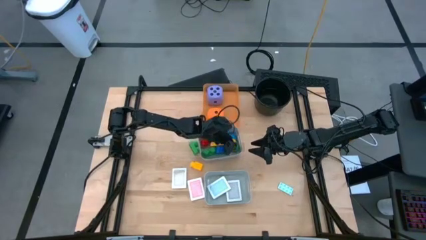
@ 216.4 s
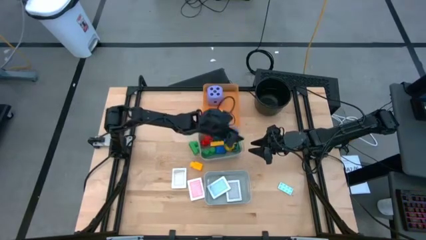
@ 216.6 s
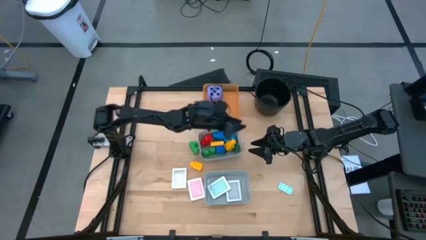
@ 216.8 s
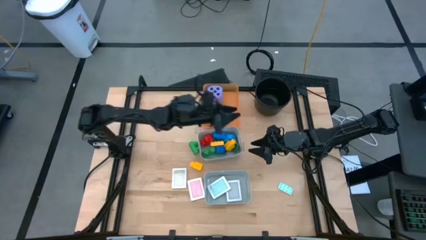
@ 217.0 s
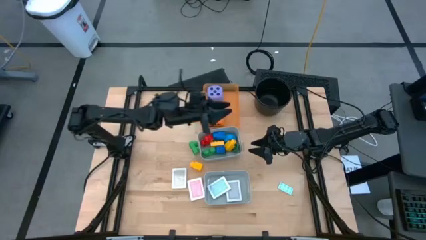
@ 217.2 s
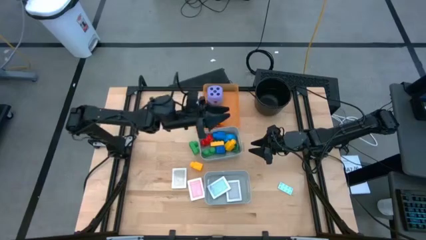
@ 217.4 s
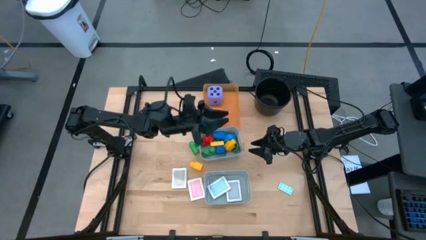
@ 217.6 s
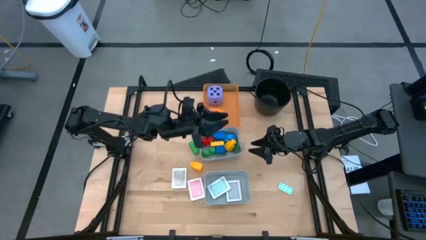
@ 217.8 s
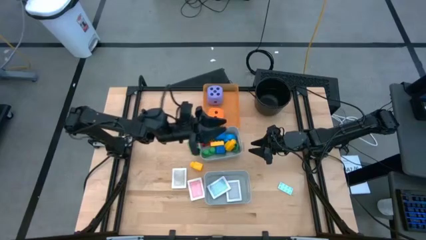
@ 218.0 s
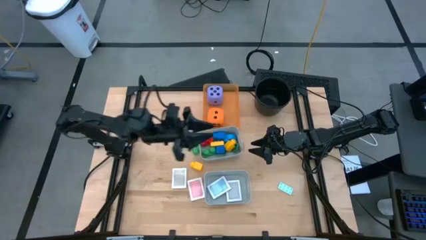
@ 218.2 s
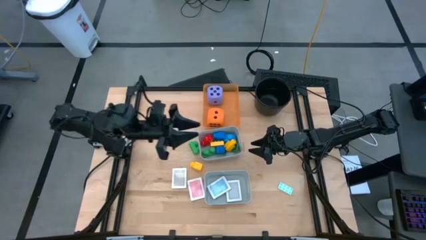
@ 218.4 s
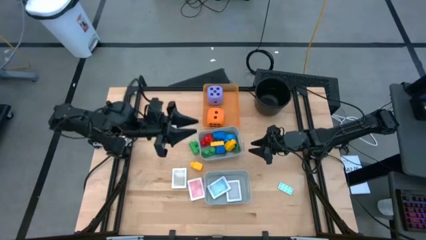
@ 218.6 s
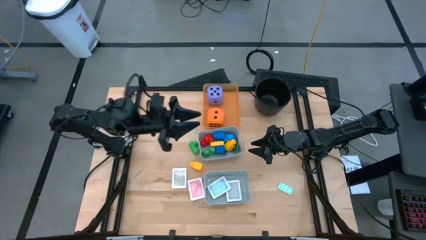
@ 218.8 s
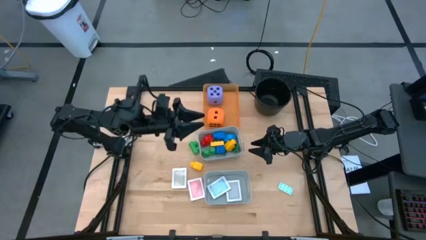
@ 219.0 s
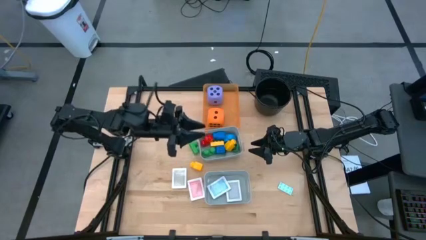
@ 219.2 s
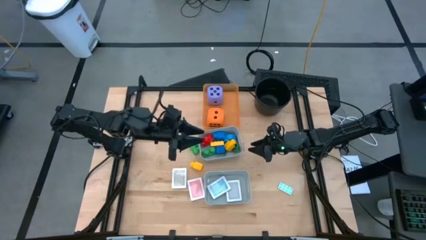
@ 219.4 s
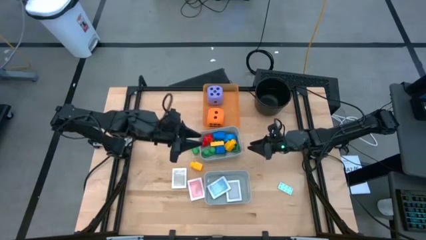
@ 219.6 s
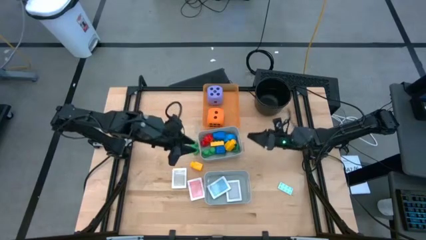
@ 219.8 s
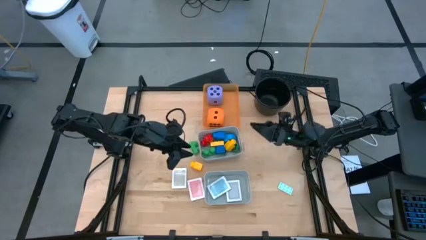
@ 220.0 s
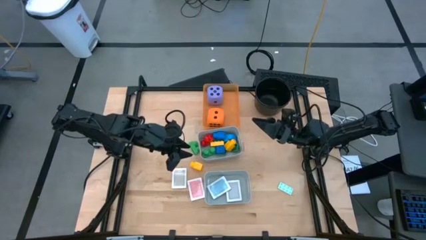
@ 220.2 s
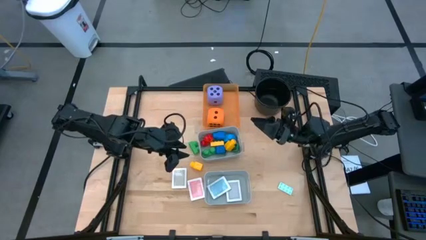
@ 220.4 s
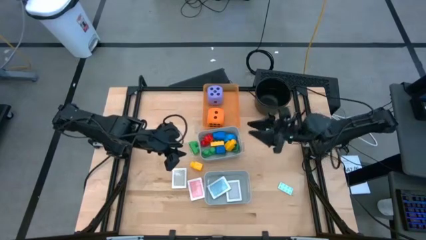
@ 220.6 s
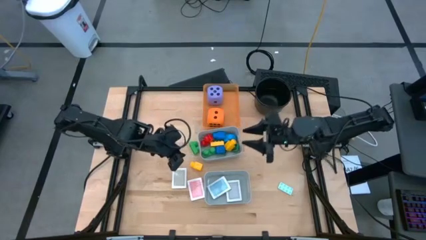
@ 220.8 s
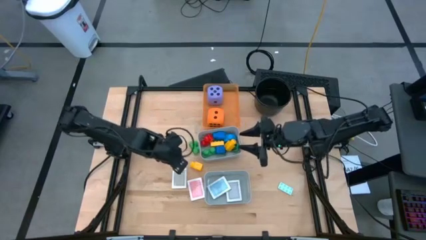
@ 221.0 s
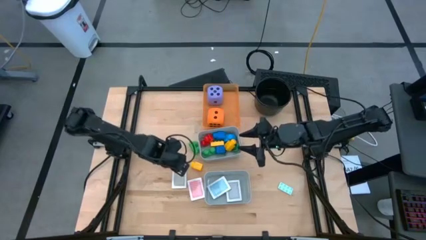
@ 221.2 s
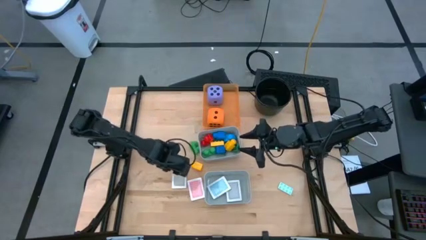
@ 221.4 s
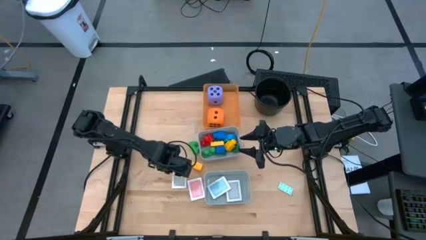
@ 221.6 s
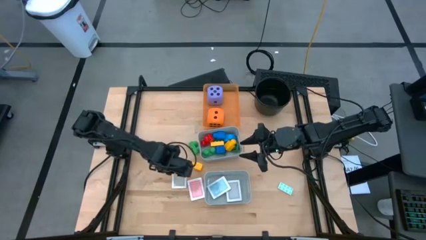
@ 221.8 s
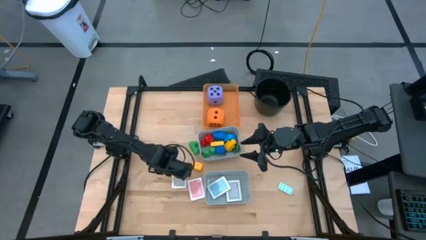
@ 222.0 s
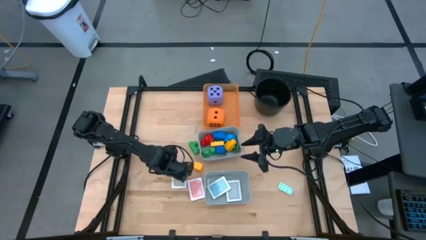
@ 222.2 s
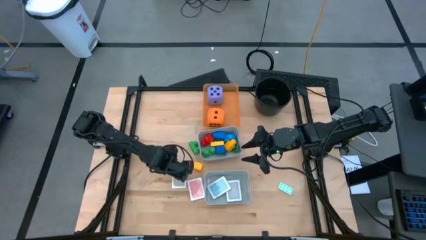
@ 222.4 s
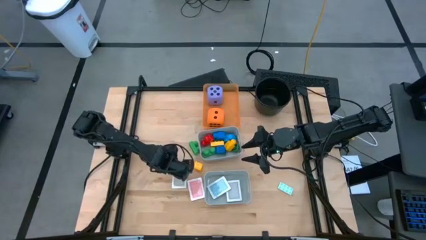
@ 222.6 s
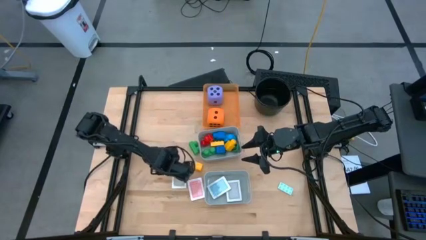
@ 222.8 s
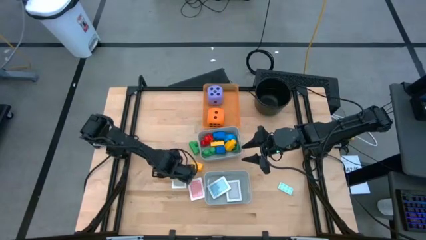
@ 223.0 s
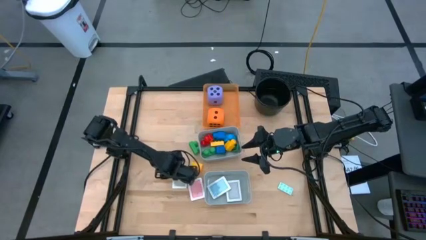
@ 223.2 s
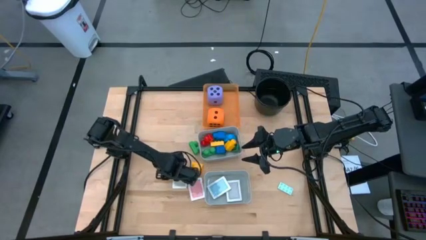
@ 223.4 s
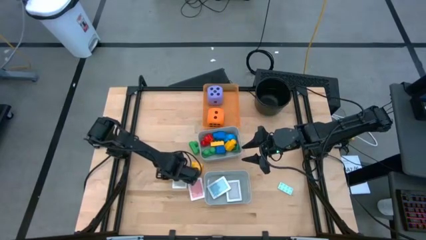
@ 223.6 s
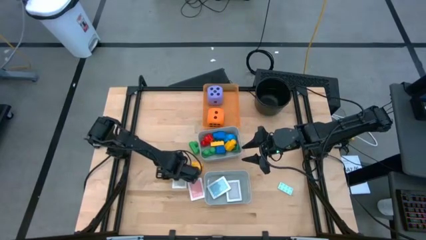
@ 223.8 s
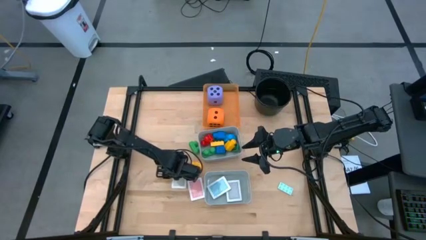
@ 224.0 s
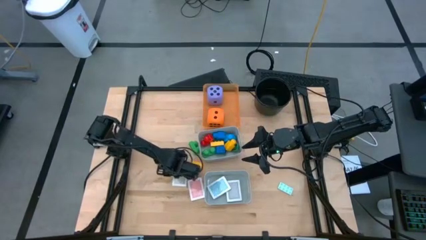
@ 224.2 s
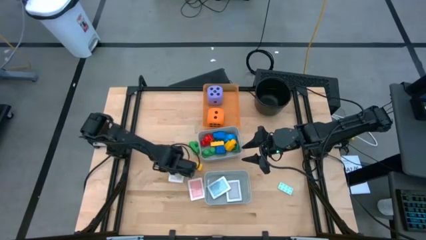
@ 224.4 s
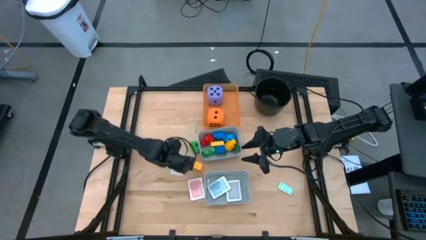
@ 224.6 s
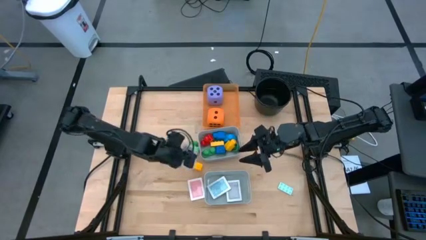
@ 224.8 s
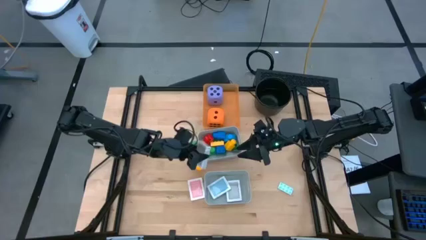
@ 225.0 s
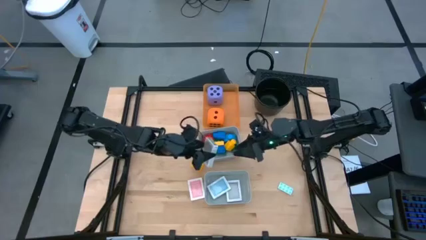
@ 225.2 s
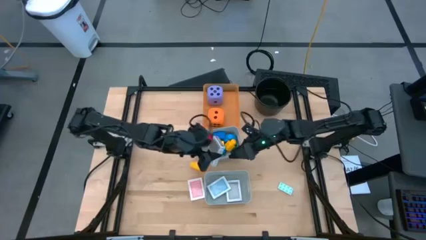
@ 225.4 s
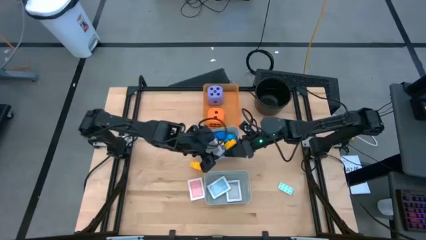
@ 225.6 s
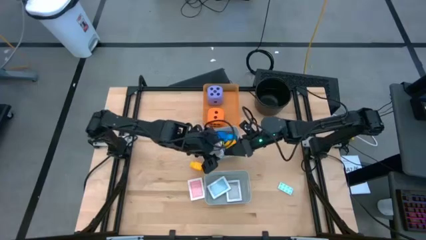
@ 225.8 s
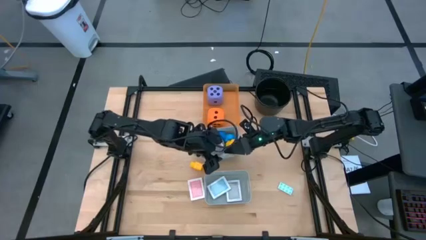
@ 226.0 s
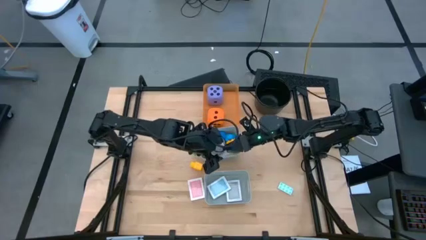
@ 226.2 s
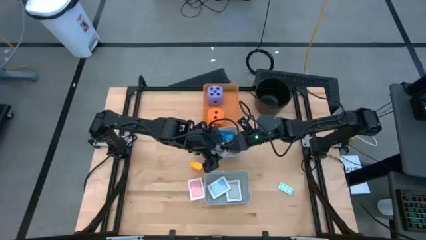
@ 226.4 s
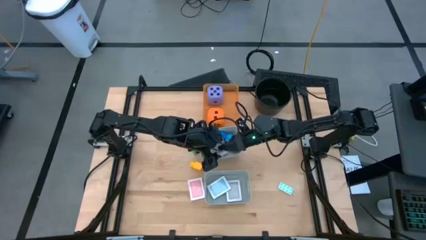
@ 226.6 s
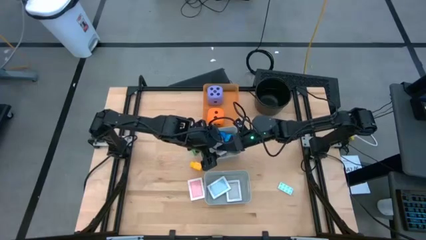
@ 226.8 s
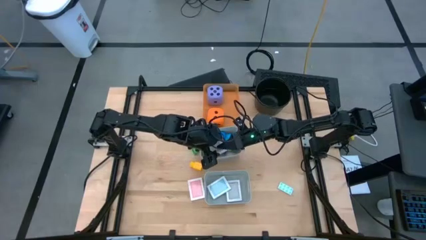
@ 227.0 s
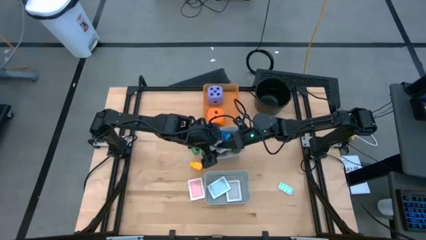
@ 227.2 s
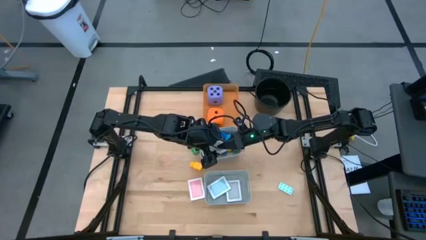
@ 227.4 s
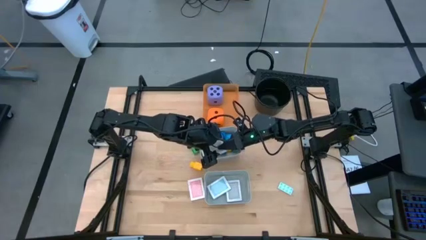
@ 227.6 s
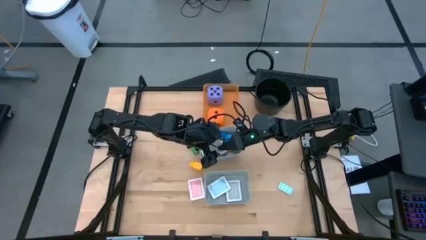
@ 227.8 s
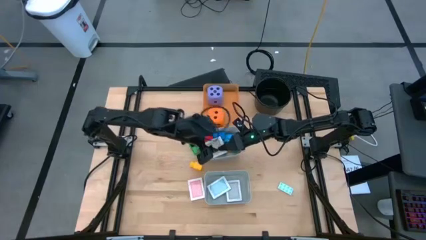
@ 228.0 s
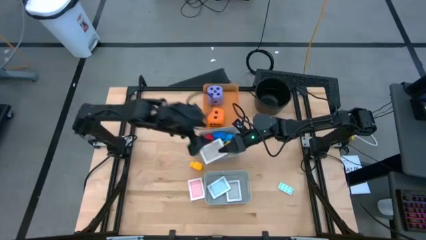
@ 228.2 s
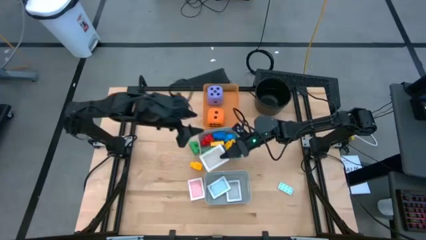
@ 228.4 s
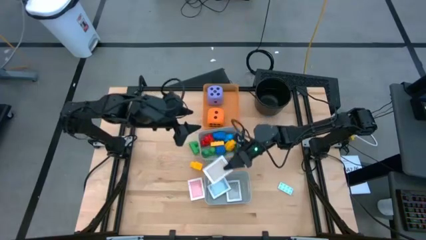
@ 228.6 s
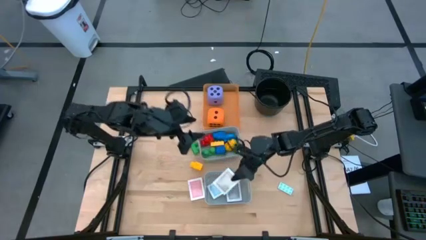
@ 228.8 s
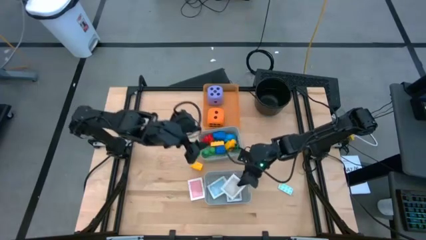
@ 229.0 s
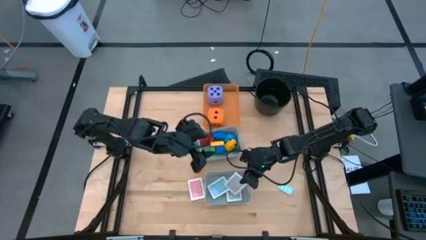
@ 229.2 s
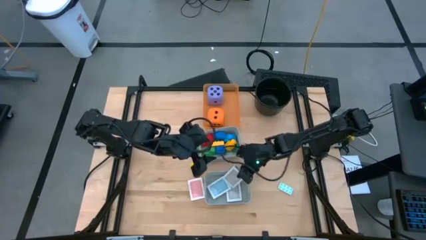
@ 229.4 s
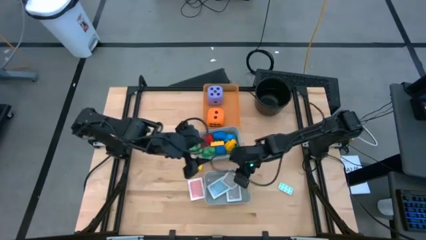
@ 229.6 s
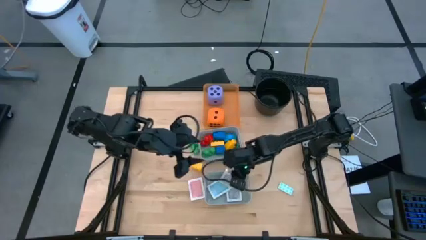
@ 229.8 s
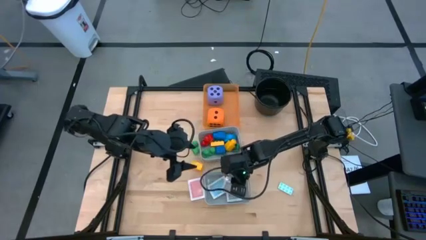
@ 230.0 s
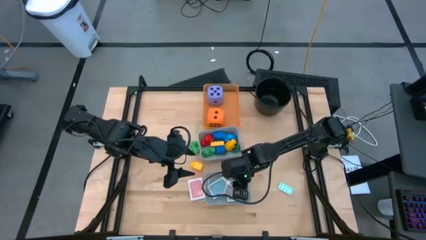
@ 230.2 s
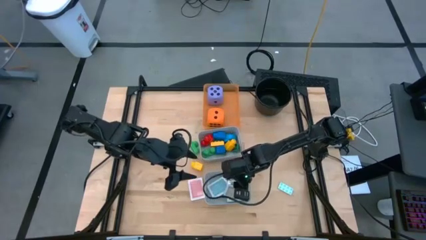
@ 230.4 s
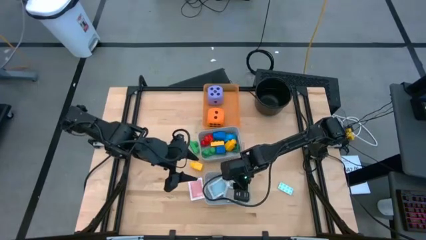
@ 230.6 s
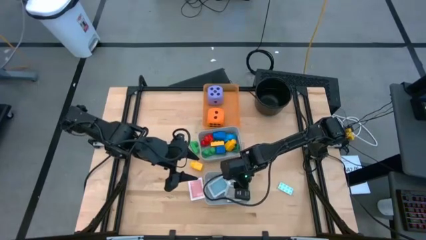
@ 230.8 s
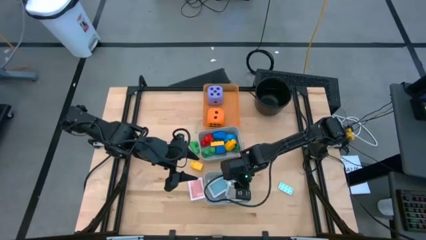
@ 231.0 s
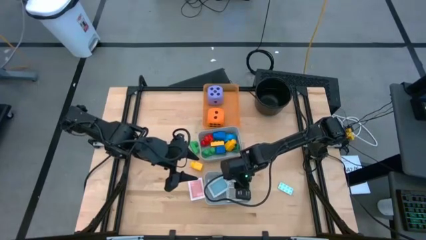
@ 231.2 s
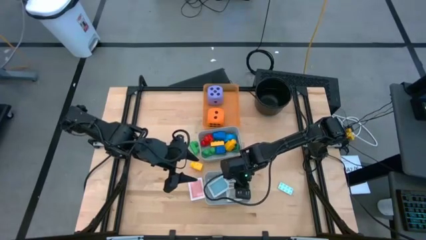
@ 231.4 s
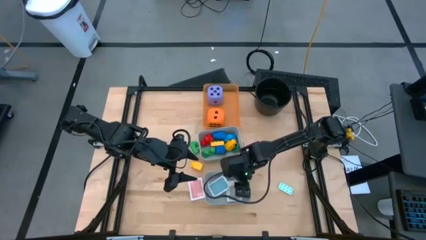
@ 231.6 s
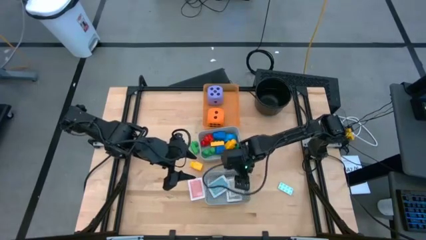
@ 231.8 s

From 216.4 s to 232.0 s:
Task: Pick & Place Toys
Put the white and brown playing card pack into the bottom gray bin
